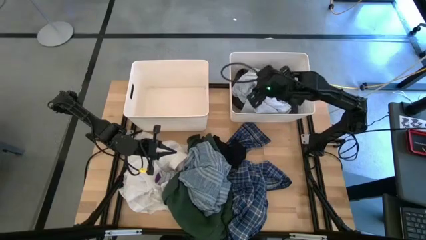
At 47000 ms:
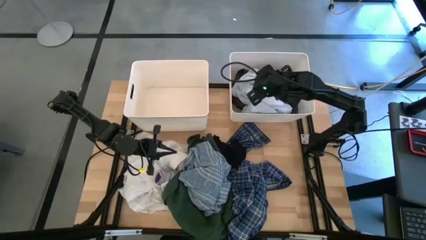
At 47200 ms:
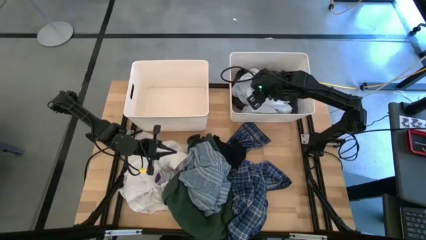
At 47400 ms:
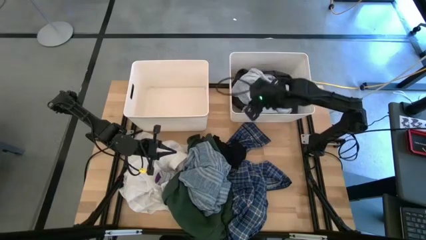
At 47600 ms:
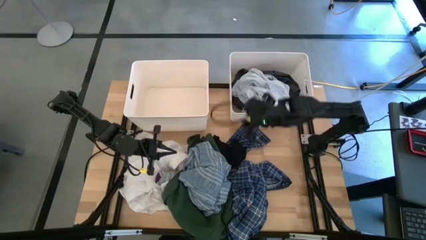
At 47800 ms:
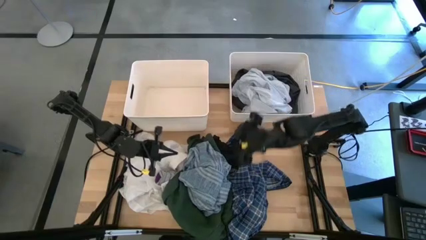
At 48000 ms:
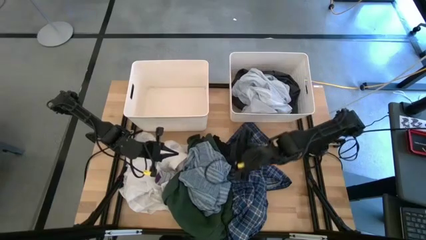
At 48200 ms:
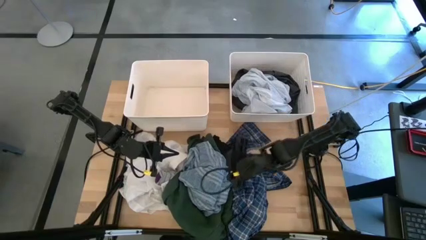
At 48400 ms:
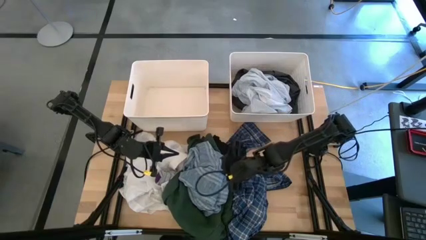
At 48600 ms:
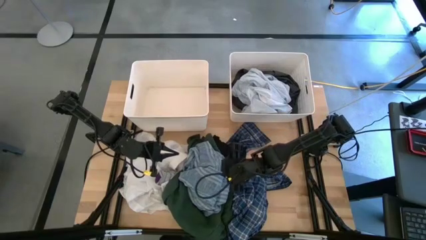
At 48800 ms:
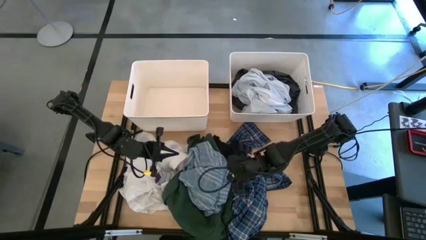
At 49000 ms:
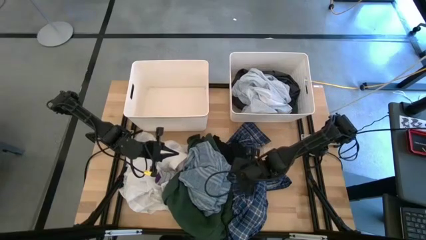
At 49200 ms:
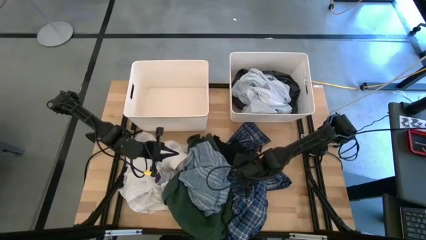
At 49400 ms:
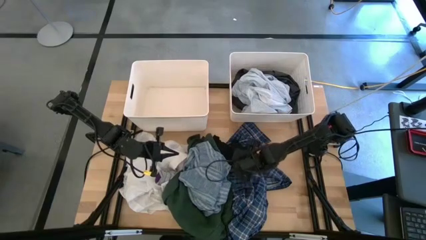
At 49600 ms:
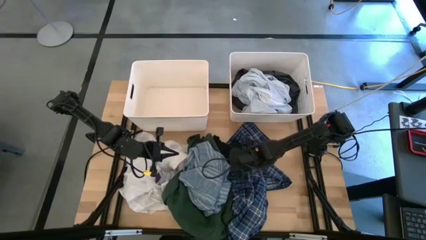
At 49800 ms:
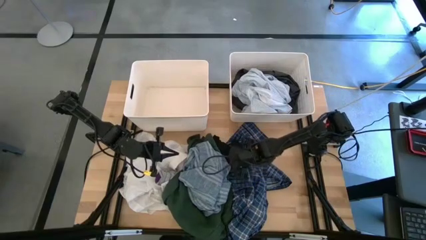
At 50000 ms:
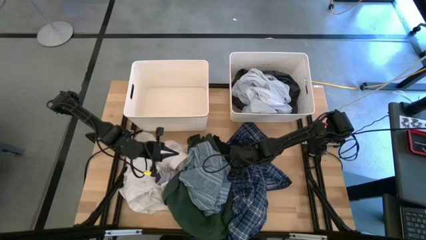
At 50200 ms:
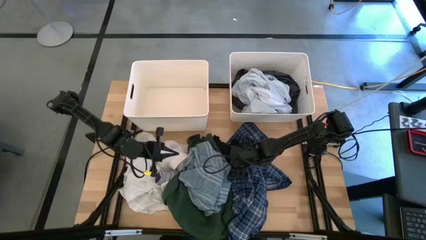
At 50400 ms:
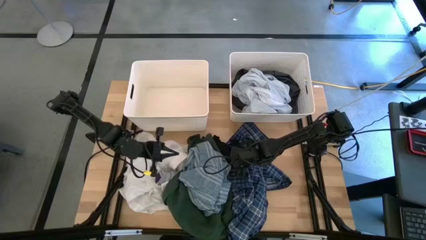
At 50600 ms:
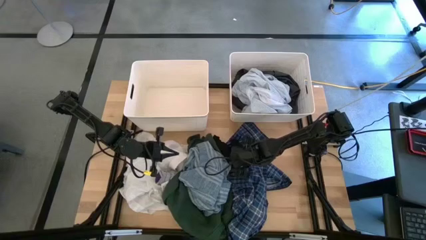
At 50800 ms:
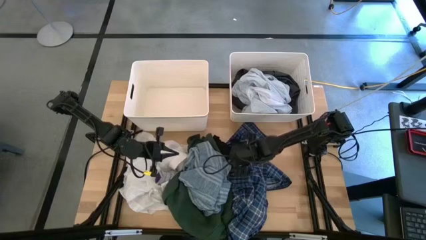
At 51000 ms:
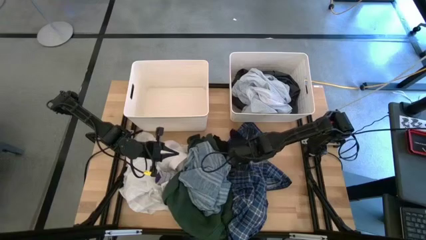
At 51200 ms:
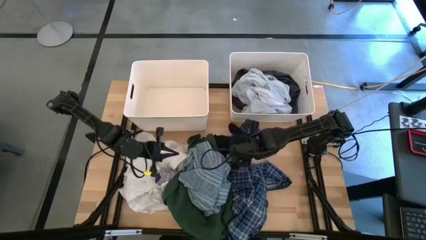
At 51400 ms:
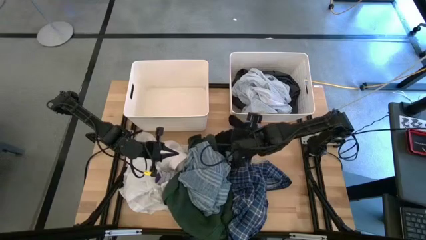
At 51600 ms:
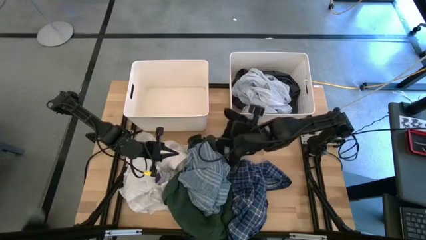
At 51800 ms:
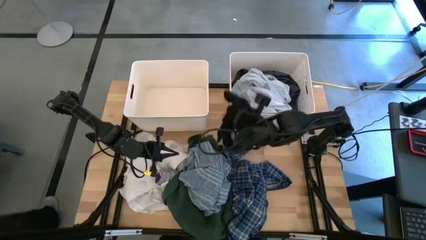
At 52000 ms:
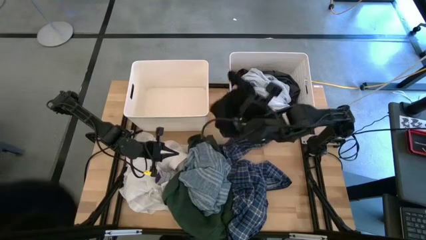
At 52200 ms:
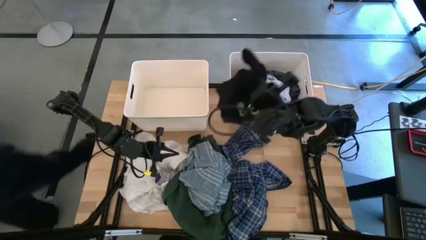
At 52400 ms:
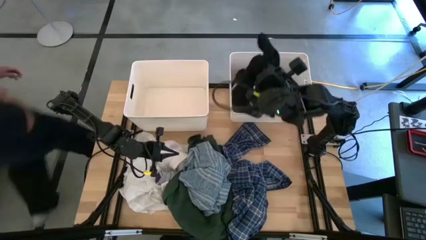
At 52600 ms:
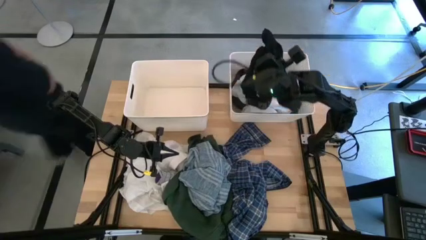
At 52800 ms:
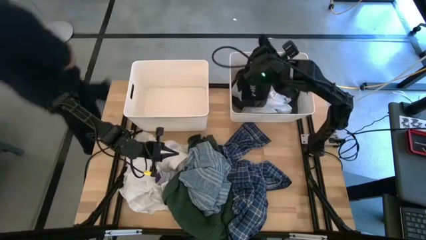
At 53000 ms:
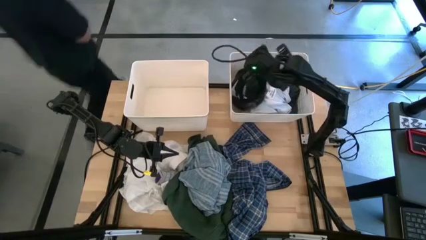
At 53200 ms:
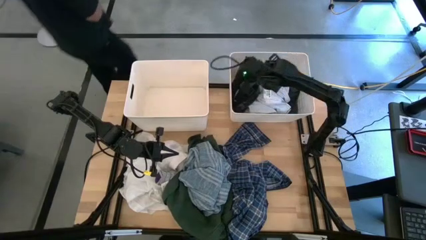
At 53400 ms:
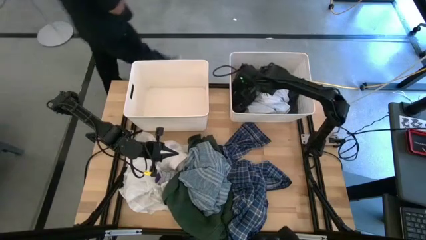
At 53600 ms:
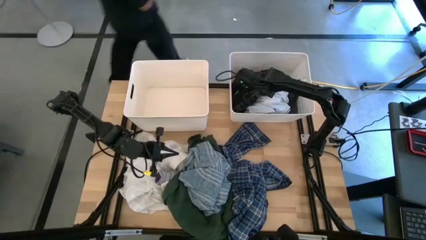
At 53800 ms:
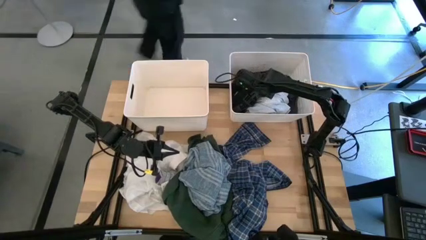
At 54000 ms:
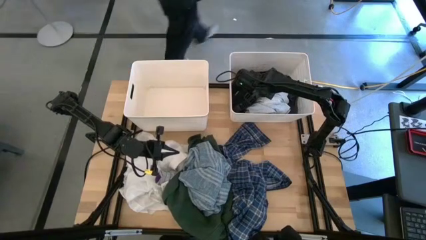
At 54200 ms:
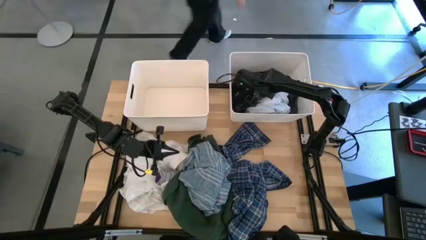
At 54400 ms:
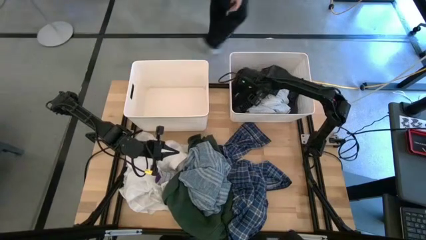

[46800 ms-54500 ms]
Task: Sort clothes
Put the black shorts into the right white bin

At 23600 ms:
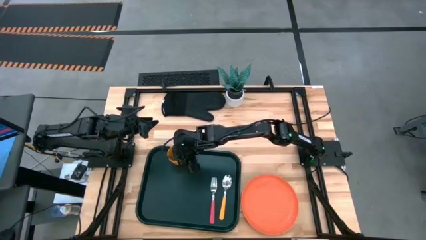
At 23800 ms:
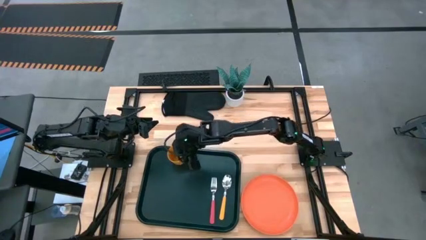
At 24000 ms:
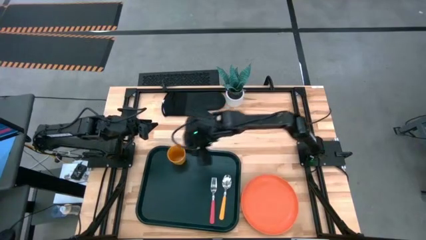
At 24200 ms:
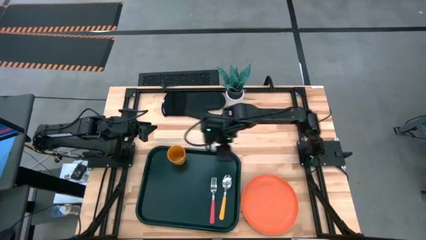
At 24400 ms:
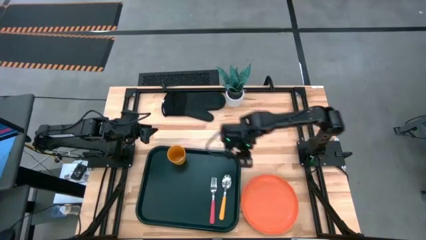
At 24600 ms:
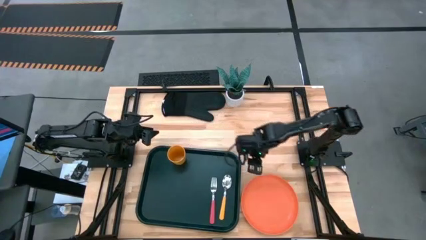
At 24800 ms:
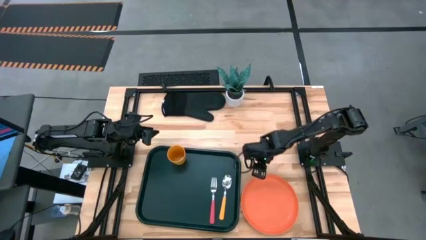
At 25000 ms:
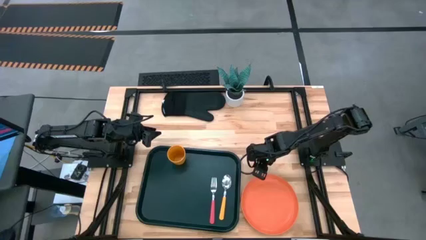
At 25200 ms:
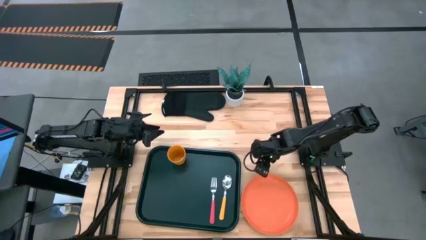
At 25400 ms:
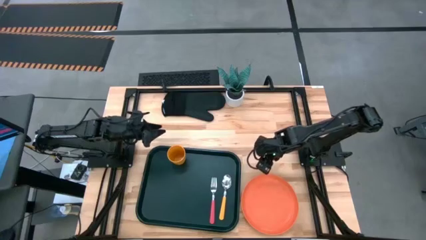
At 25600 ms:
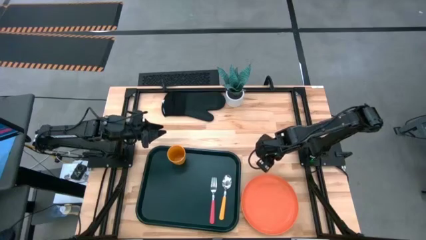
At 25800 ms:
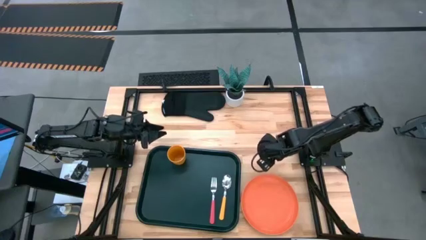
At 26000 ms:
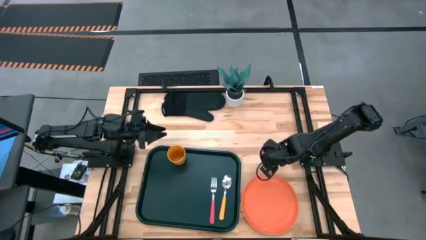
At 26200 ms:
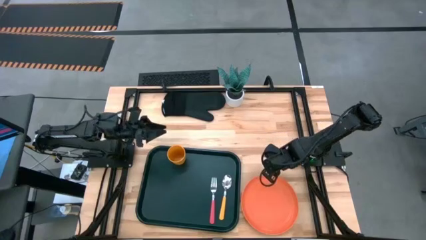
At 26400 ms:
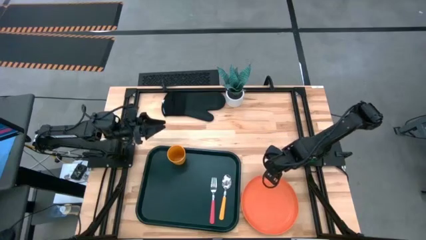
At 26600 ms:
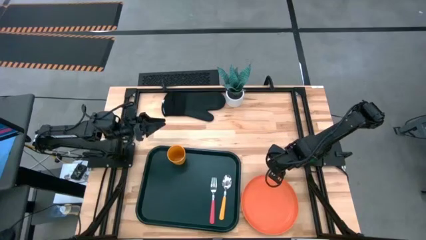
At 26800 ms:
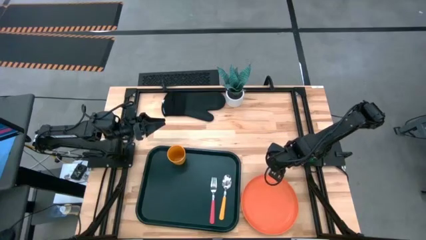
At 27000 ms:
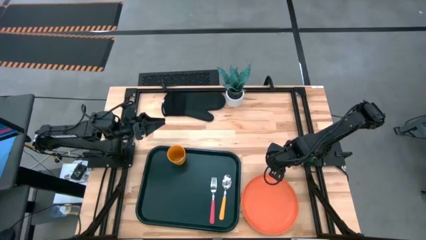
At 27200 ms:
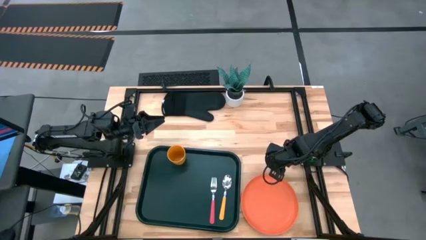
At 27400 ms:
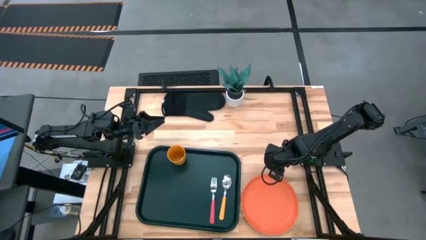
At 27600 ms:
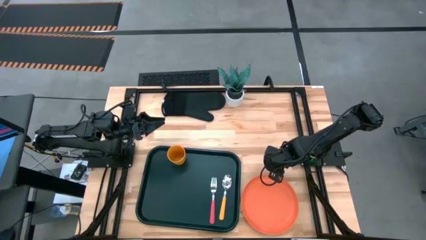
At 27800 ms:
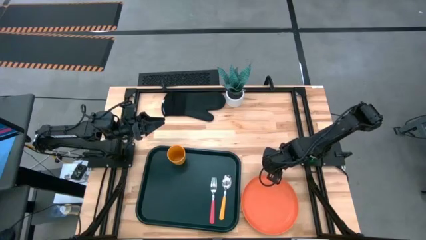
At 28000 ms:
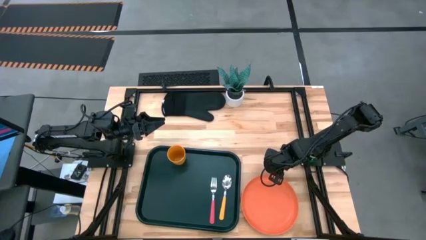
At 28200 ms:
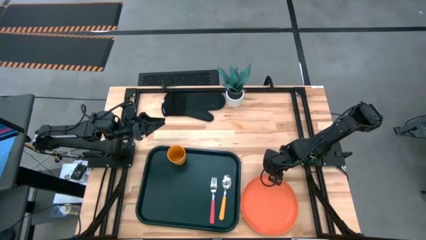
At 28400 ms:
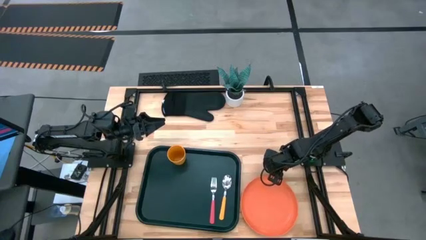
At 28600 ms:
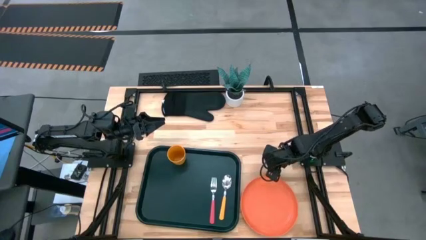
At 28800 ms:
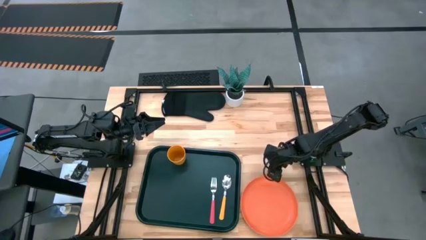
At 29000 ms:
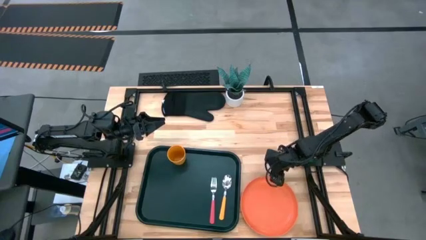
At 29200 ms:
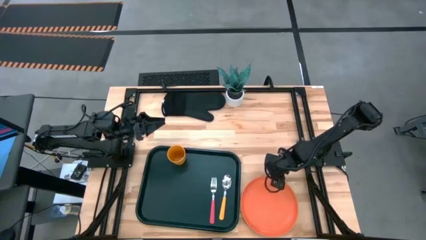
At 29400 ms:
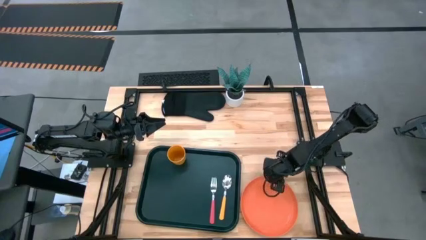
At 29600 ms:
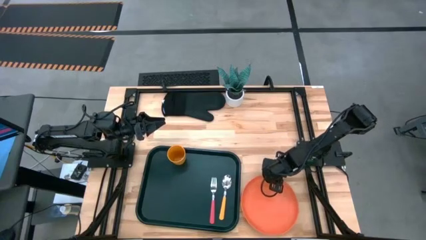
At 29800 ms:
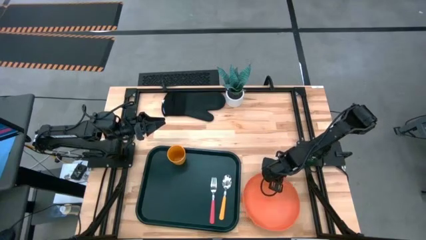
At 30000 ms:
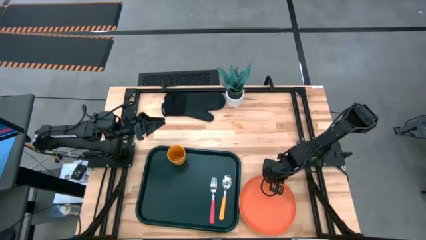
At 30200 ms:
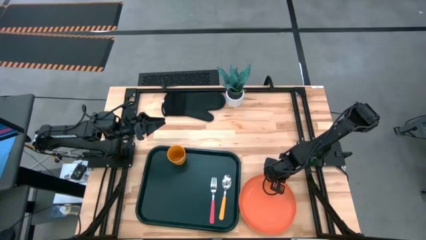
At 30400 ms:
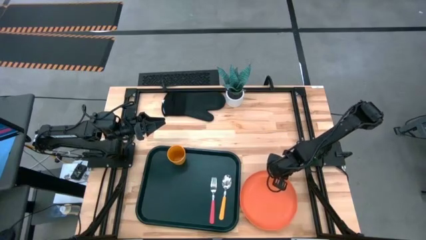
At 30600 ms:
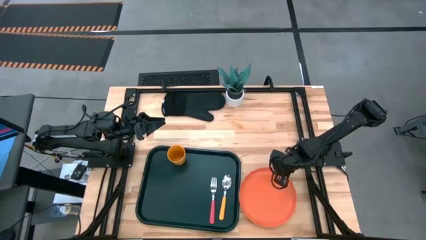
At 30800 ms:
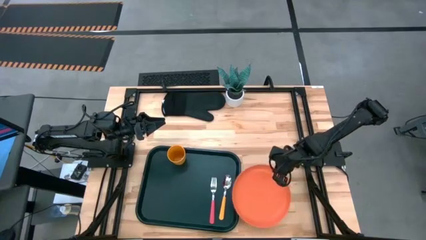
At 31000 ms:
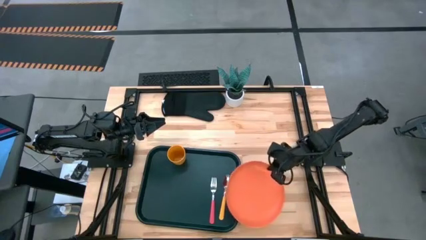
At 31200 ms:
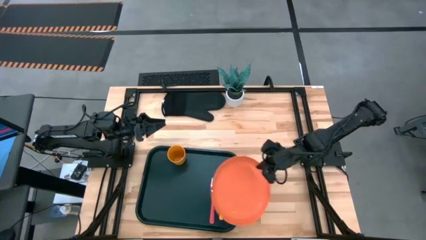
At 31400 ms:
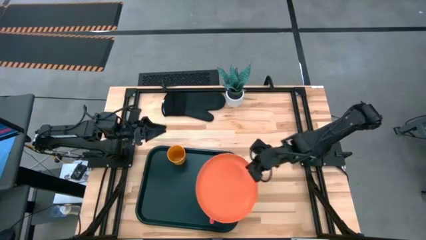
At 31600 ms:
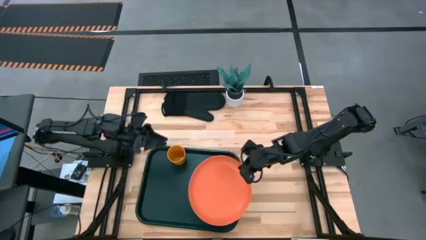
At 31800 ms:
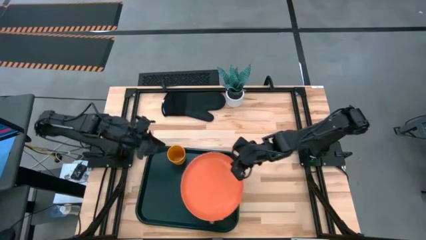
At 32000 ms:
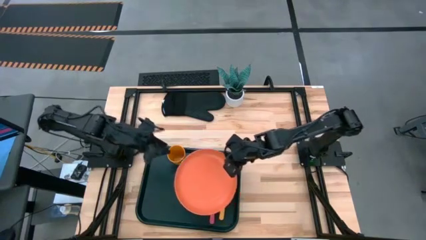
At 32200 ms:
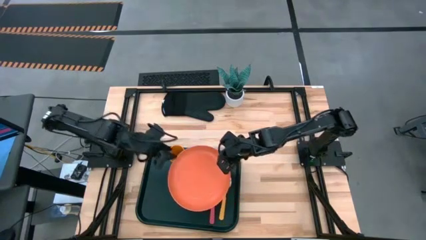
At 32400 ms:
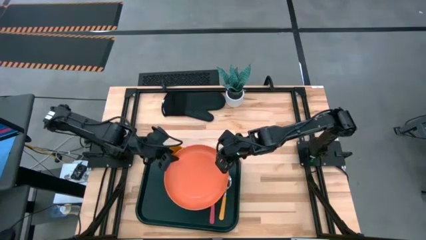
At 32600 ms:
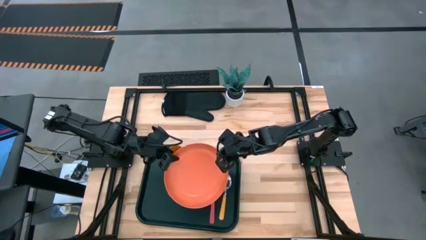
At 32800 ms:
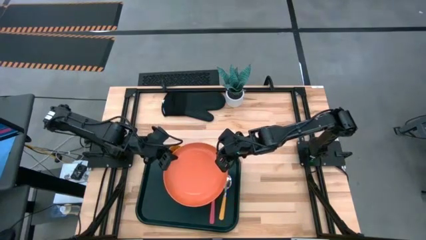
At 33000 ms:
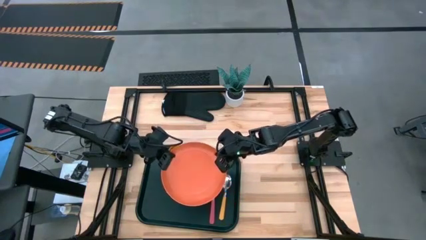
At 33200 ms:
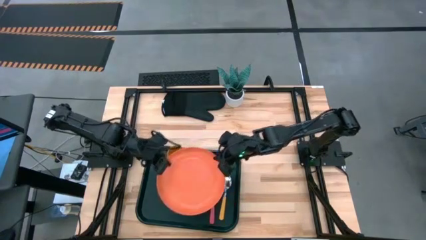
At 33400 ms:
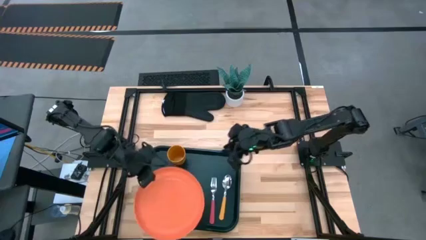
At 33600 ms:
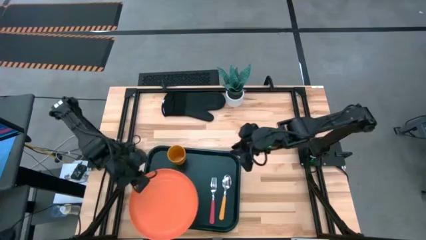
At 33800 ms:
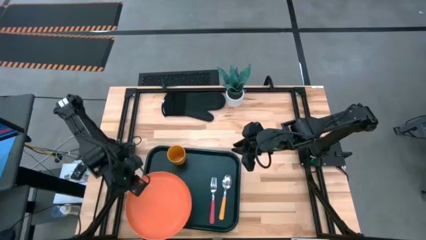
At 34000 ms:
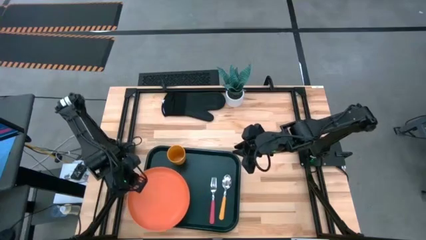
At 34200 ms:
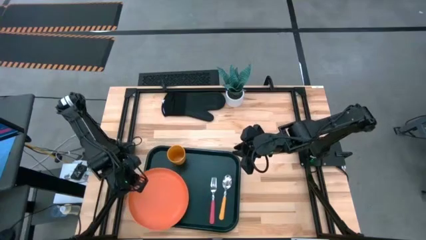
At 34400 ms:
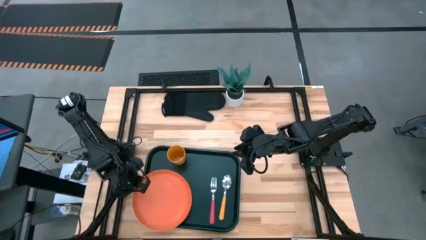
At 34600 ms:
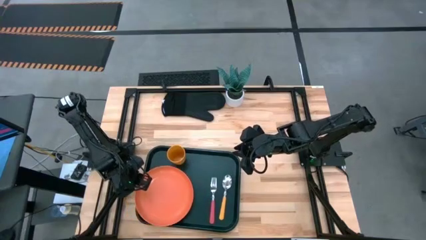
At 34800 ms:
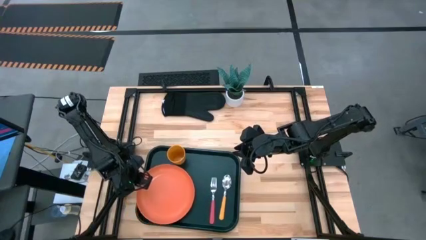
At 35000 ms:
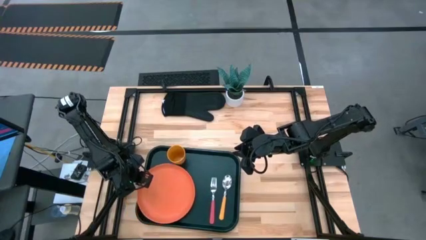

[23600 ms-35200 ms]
Task: Pick and place plate/cup/fork/spoon on tray
Put the orange plate under the cup on the tray
